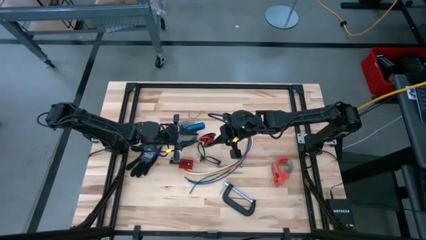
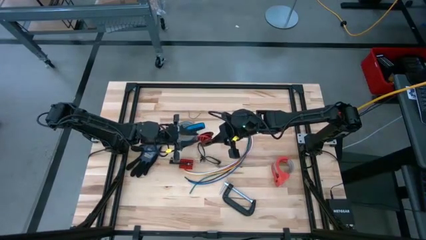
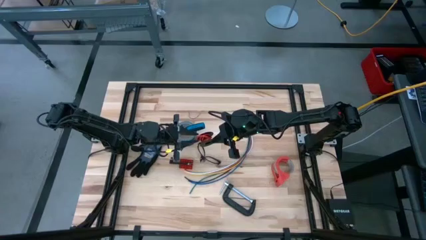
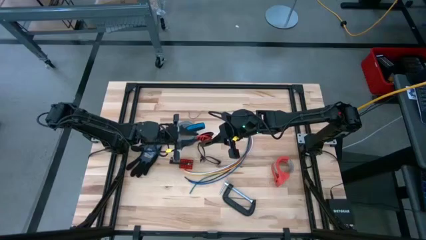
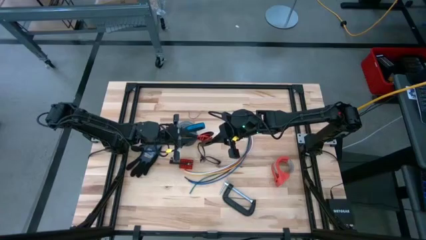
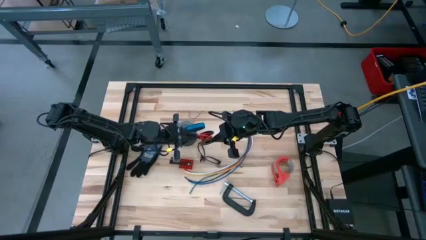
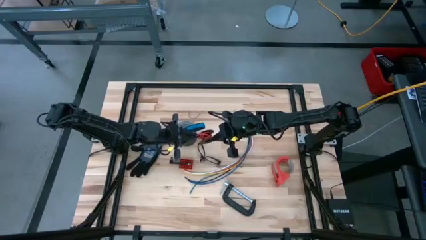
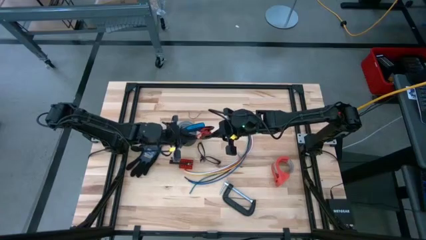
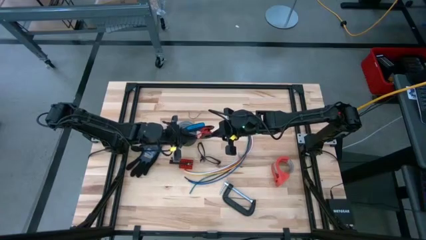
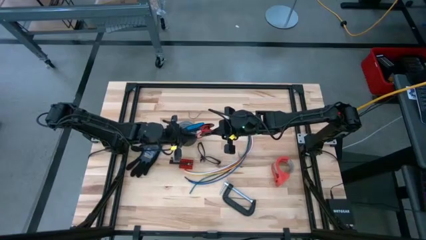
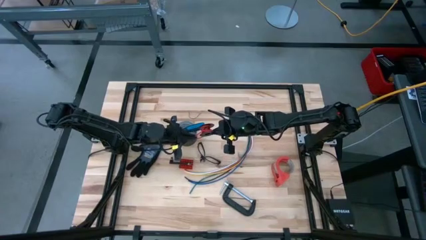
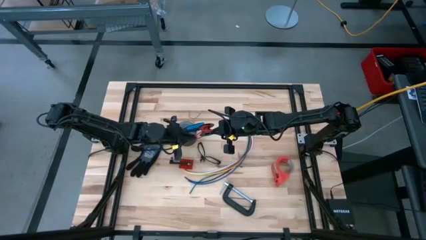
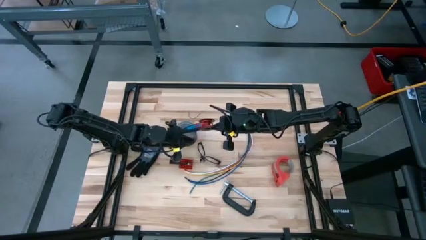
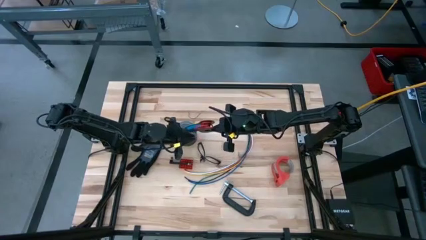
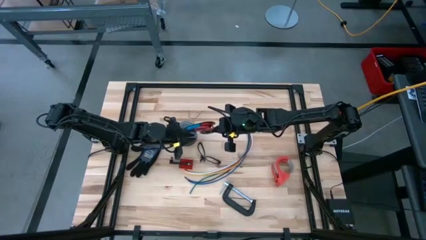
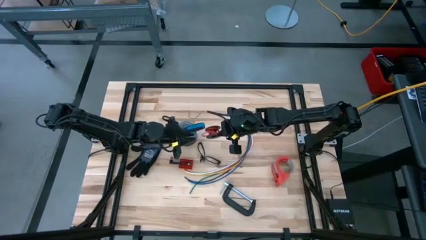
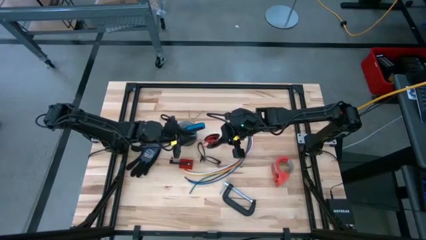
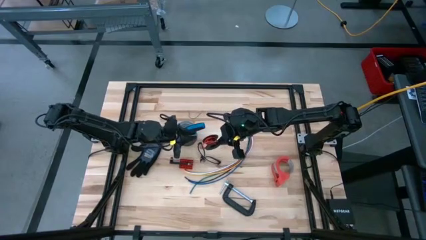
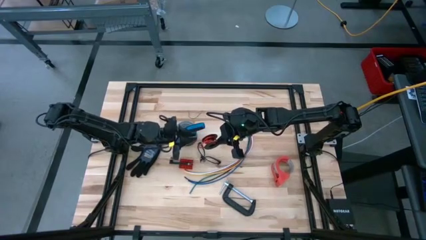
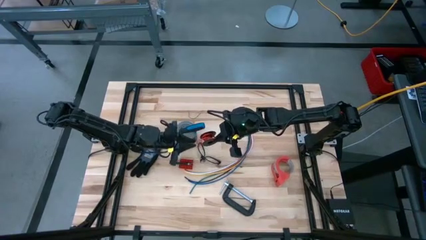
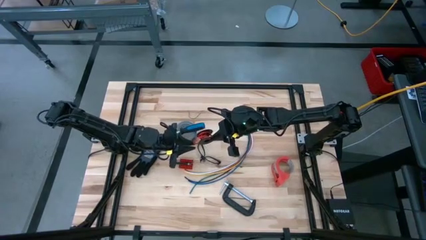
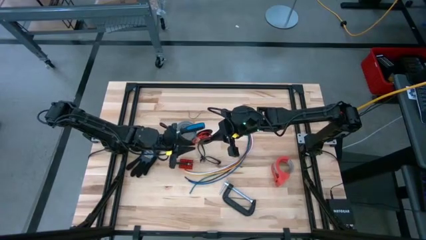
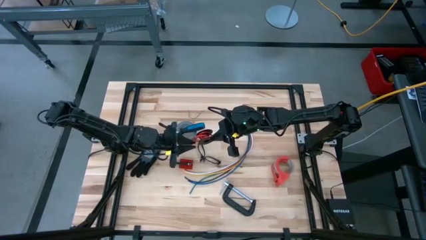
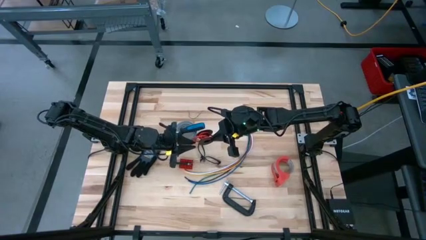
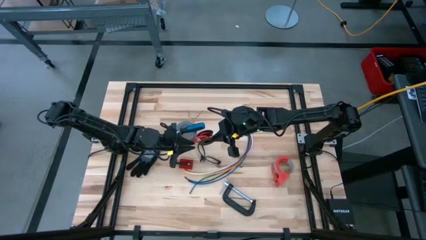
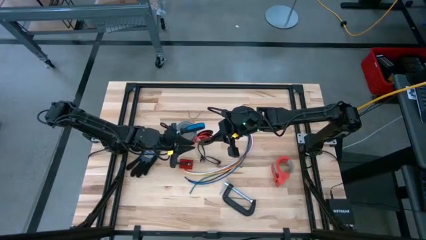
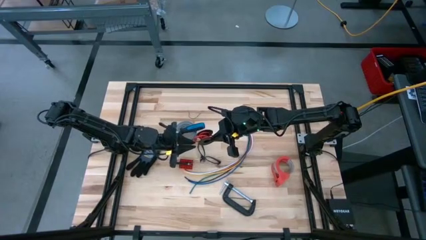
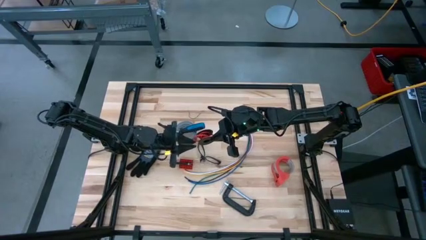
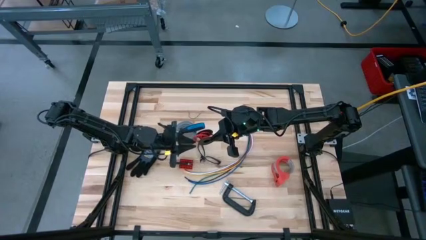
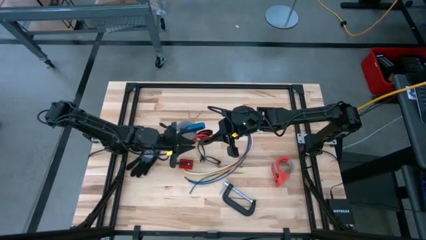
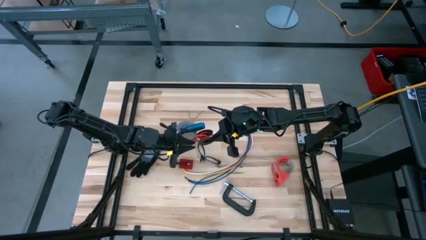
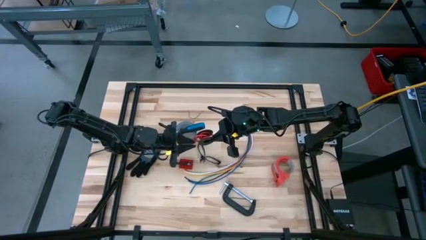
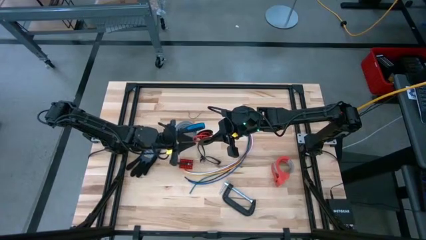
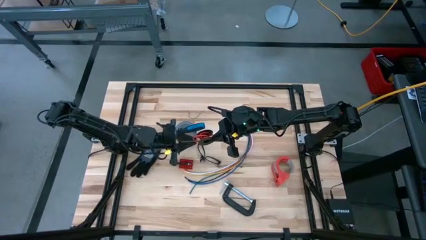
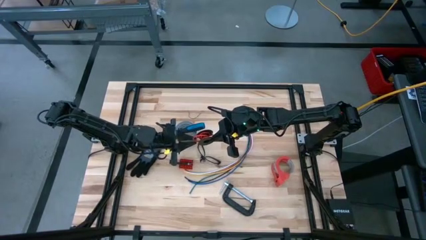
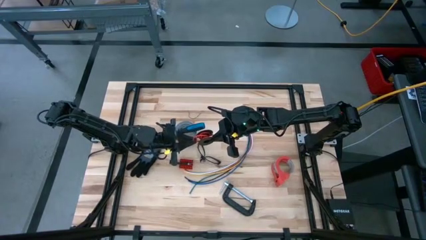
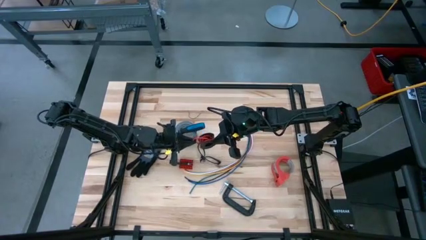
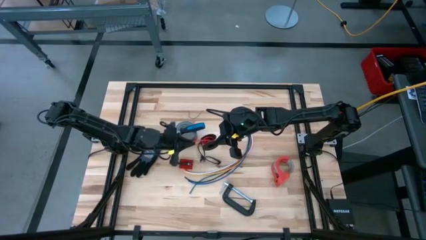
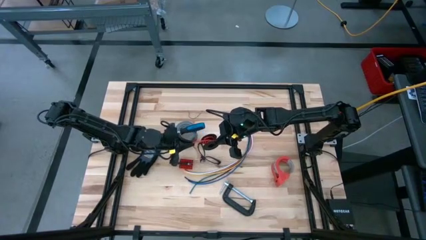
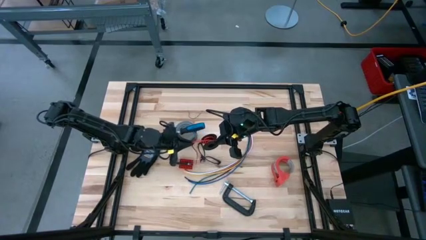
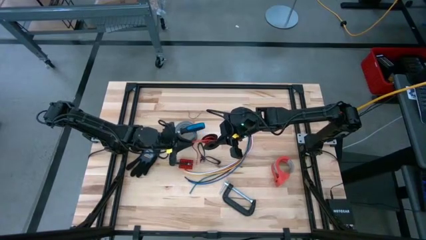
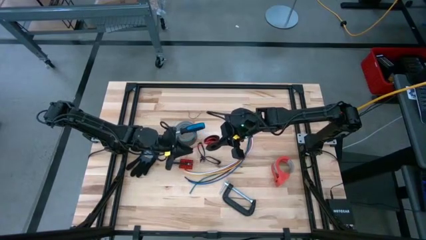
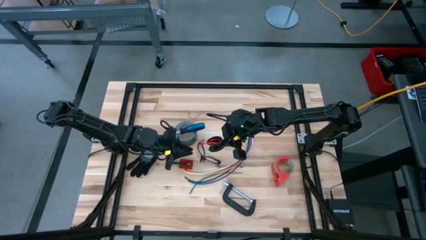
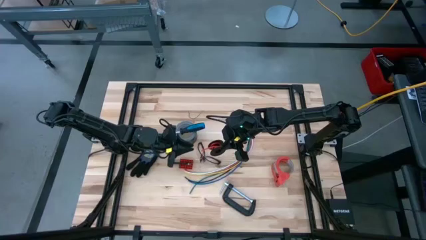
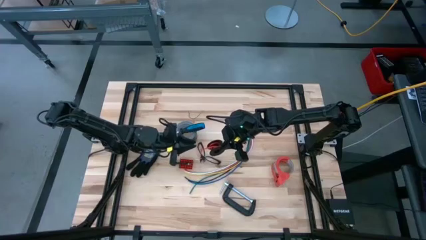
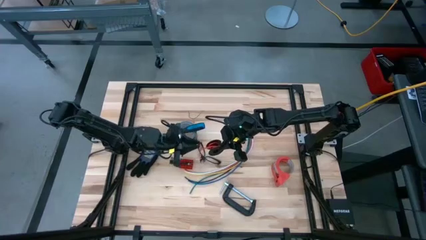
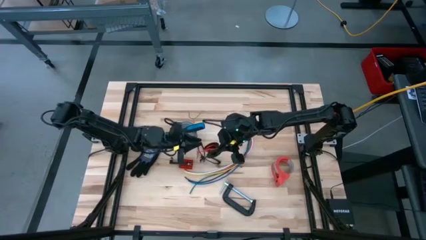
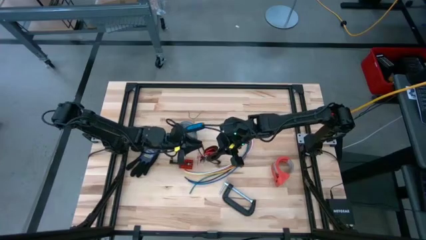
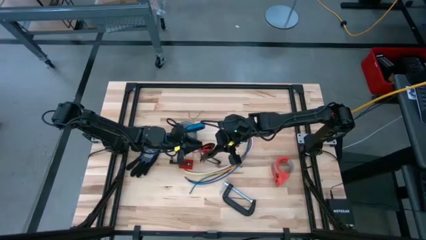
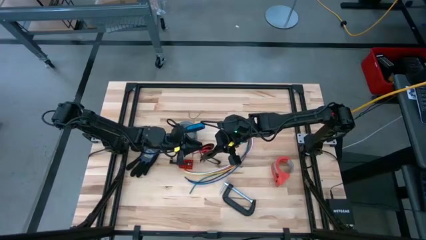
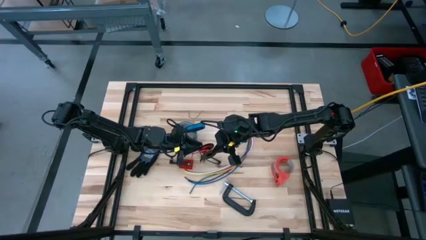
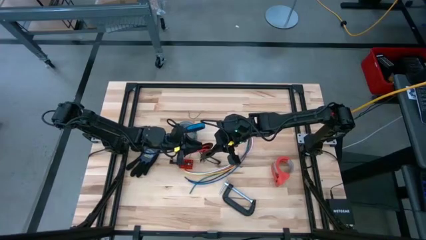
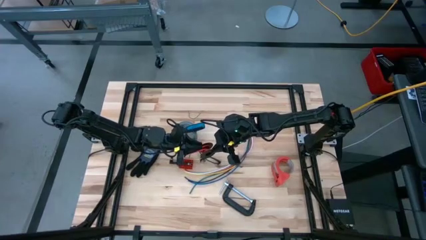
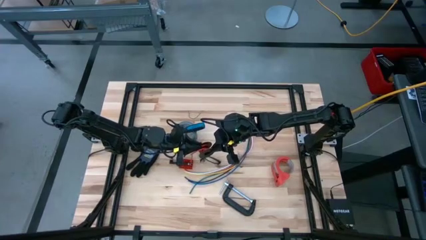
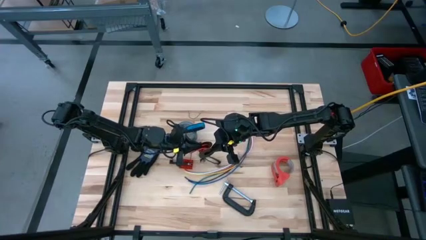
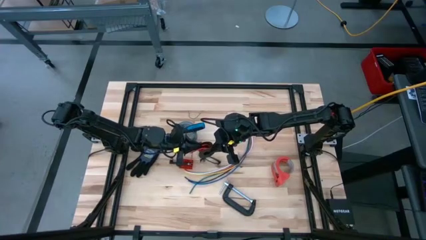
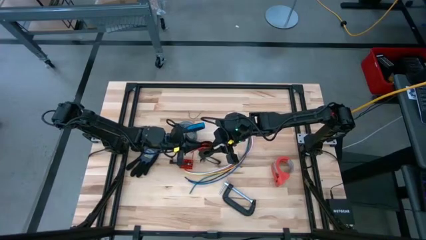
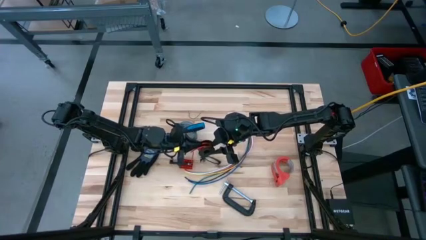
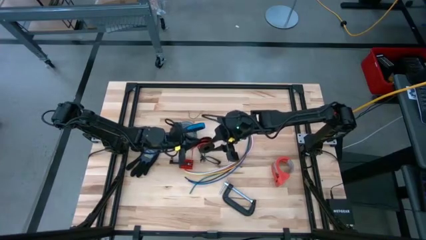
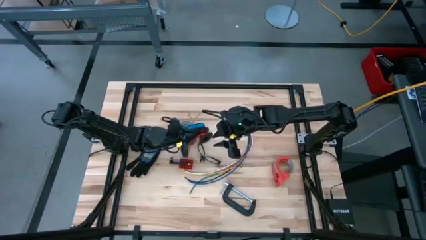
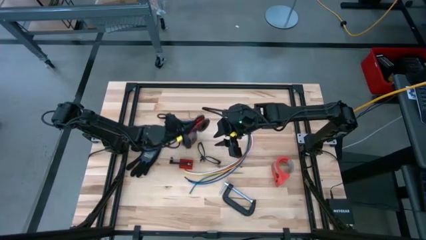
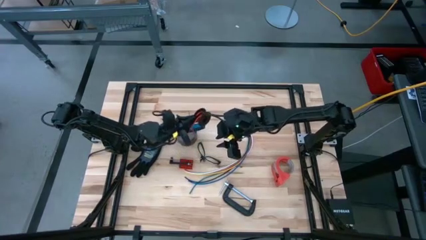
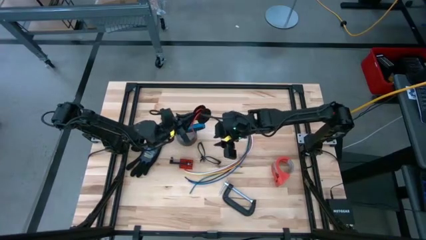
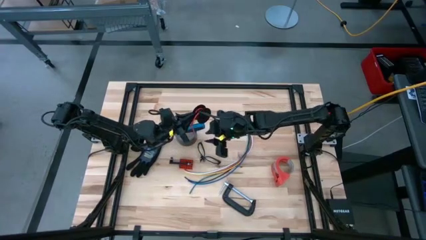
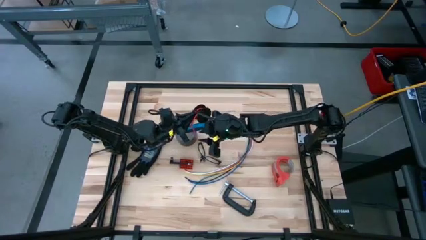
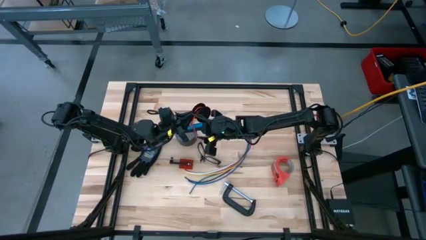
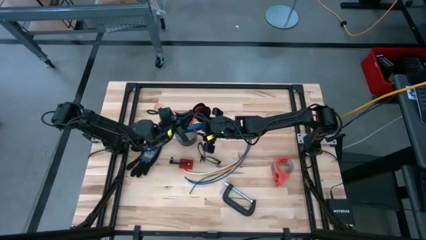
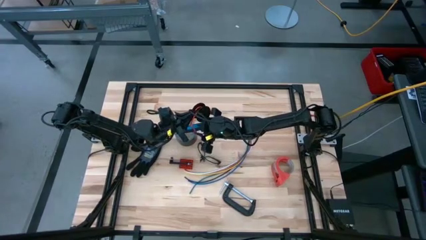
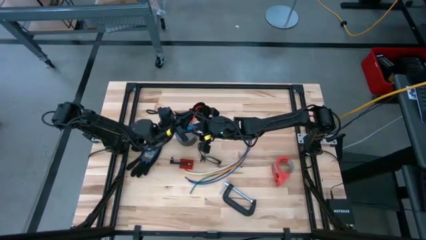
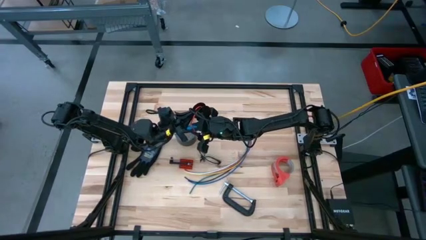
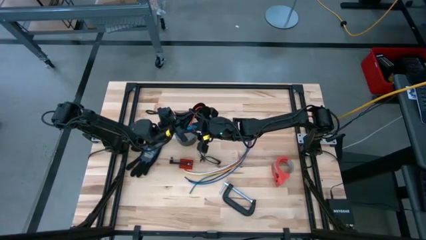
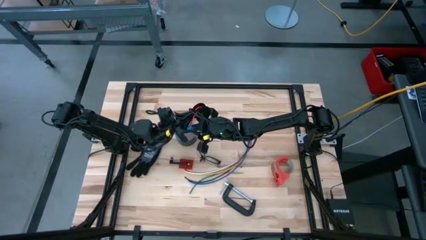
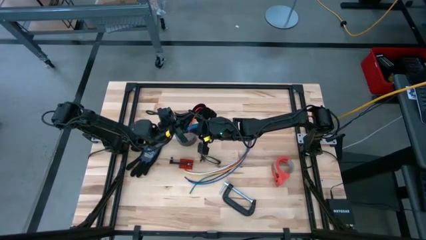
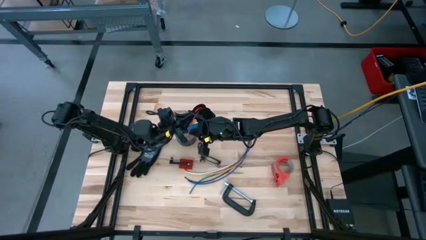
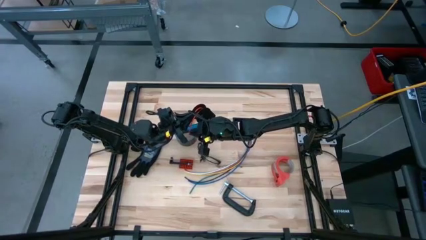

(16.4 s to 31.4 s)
Task: Coil cords
Uncoil the red wire from the black spool
